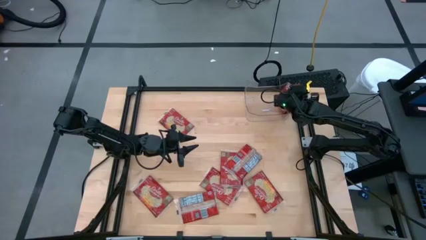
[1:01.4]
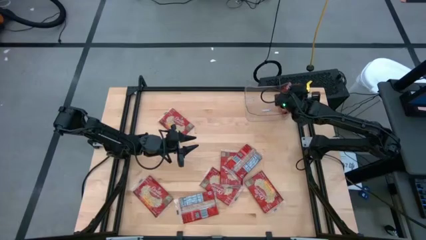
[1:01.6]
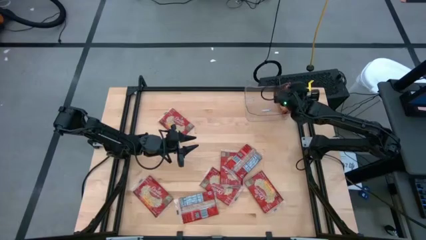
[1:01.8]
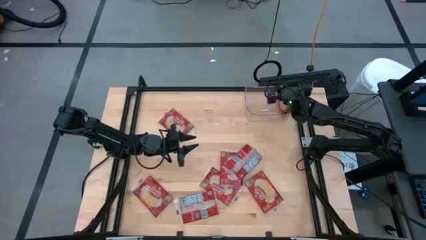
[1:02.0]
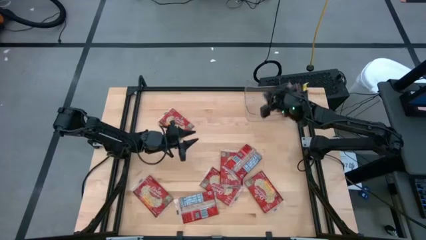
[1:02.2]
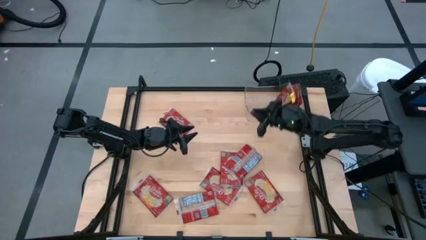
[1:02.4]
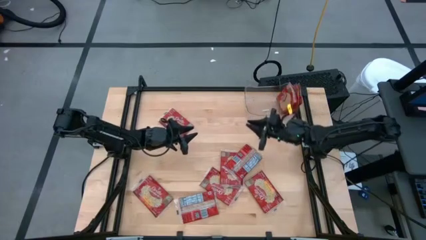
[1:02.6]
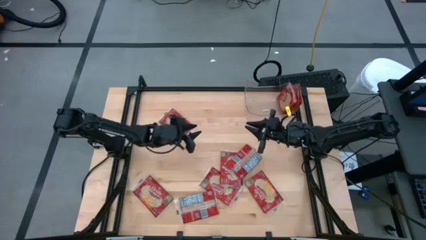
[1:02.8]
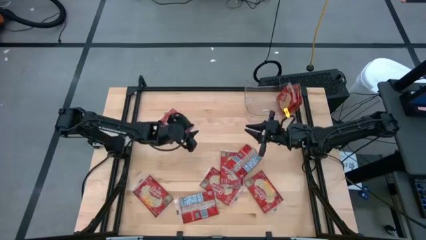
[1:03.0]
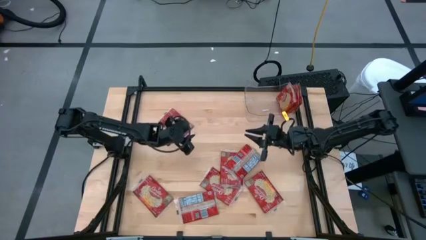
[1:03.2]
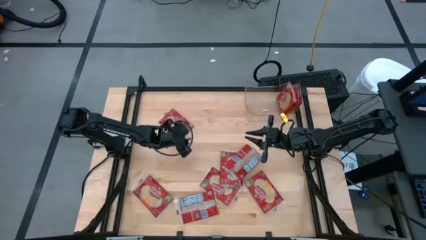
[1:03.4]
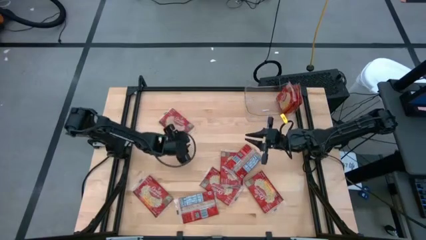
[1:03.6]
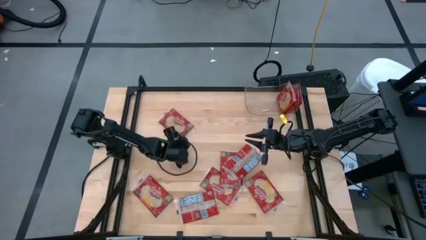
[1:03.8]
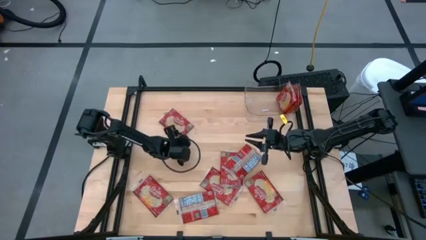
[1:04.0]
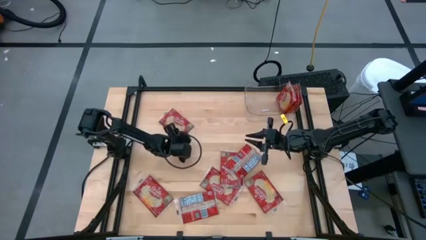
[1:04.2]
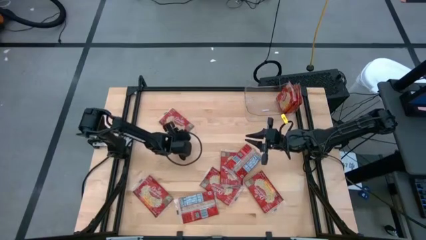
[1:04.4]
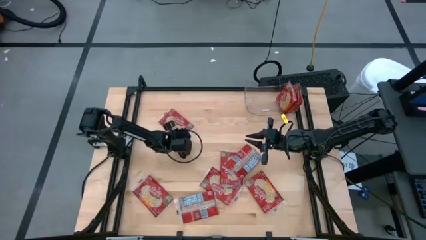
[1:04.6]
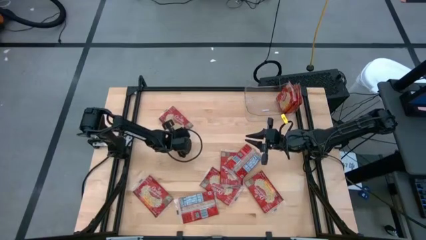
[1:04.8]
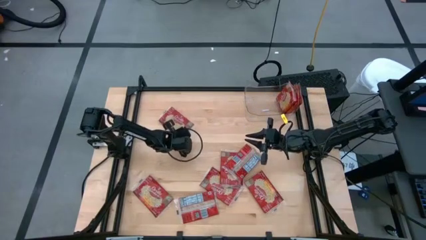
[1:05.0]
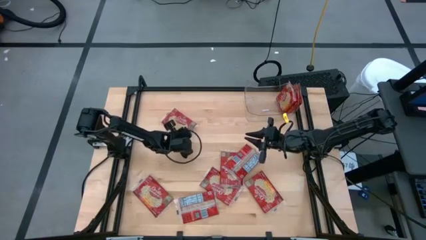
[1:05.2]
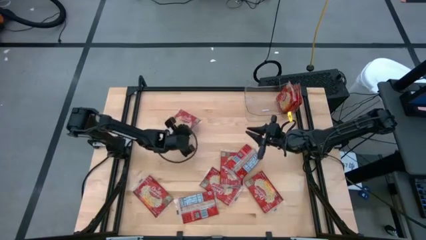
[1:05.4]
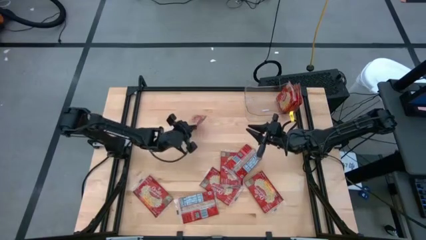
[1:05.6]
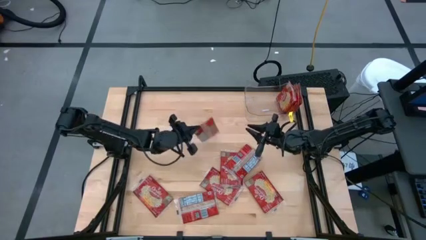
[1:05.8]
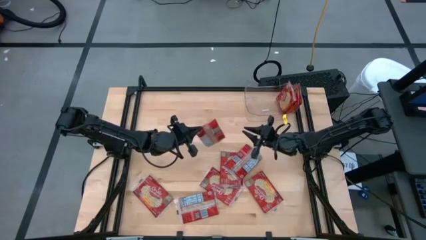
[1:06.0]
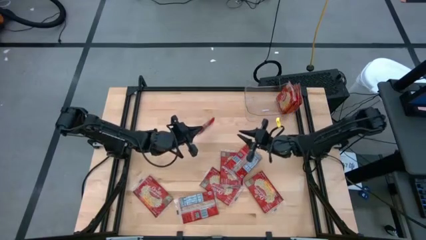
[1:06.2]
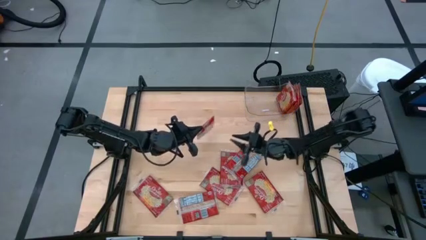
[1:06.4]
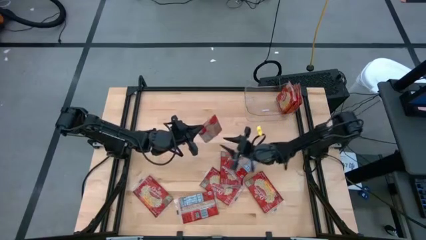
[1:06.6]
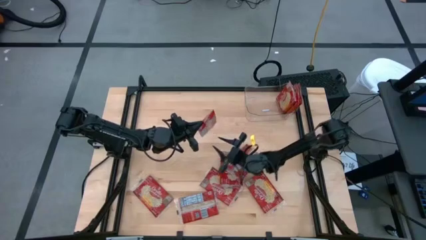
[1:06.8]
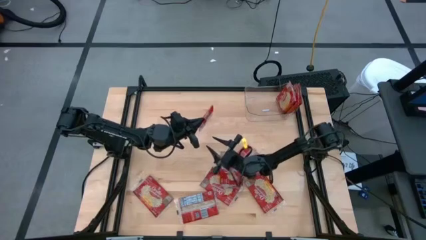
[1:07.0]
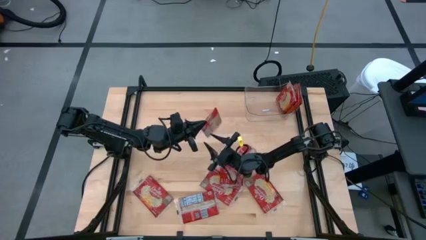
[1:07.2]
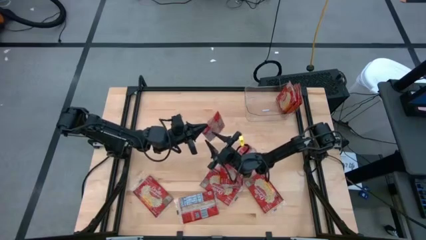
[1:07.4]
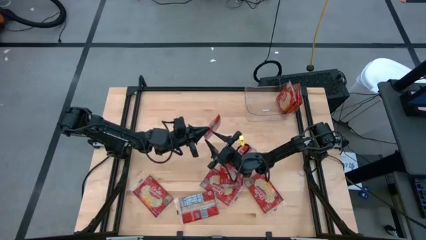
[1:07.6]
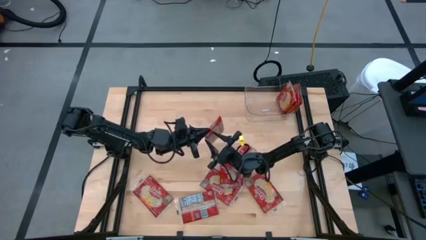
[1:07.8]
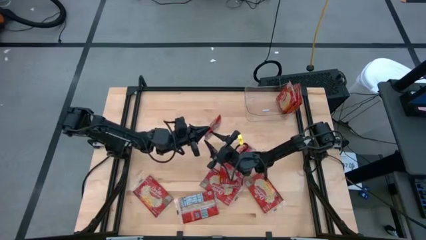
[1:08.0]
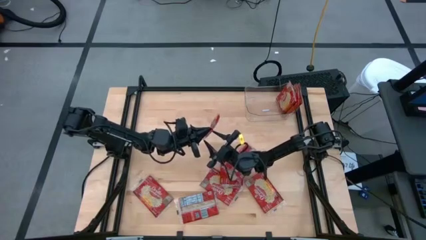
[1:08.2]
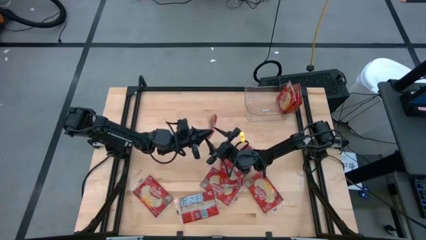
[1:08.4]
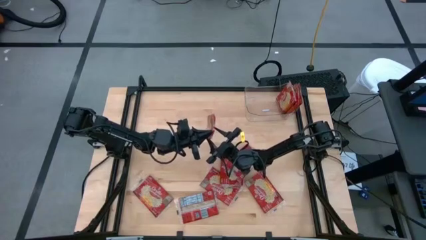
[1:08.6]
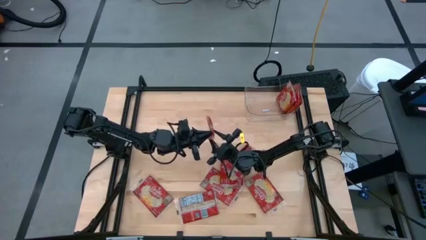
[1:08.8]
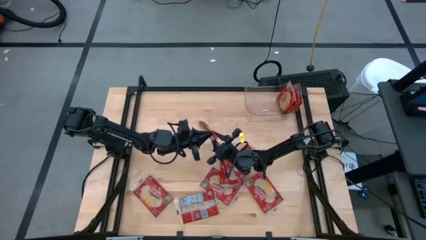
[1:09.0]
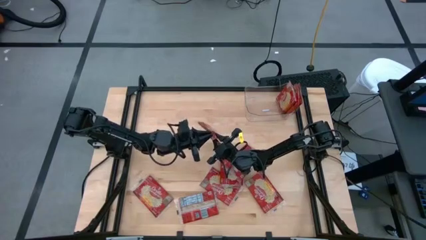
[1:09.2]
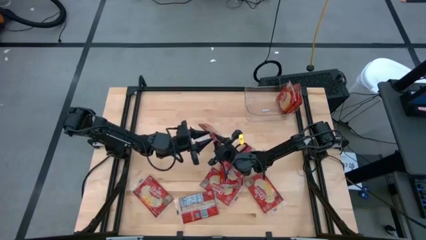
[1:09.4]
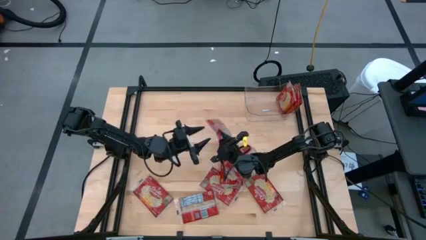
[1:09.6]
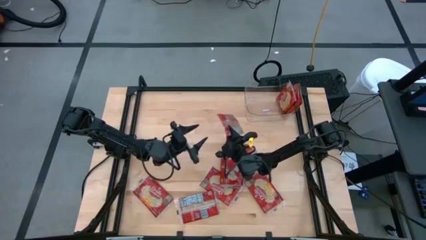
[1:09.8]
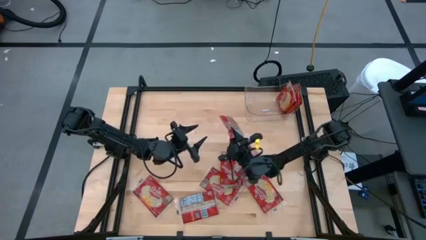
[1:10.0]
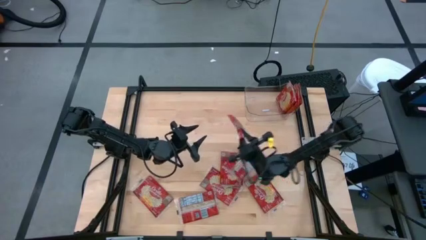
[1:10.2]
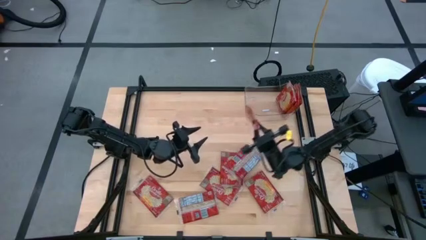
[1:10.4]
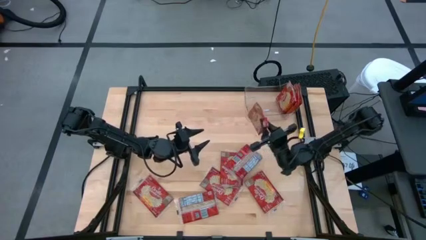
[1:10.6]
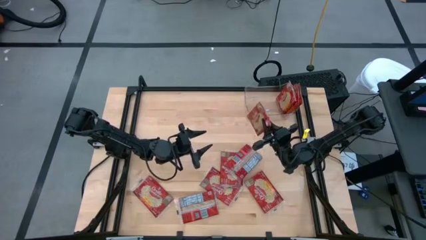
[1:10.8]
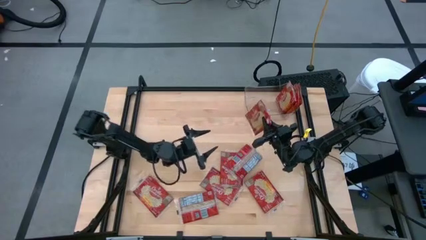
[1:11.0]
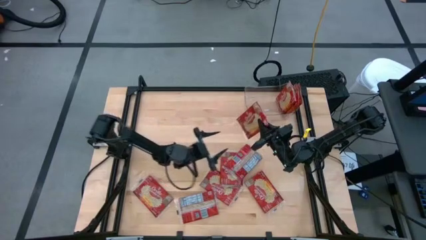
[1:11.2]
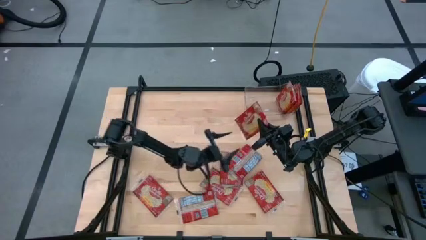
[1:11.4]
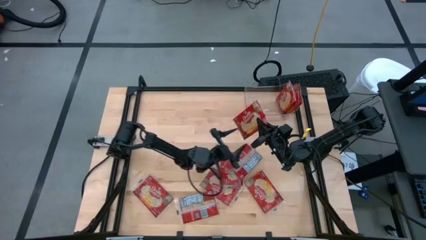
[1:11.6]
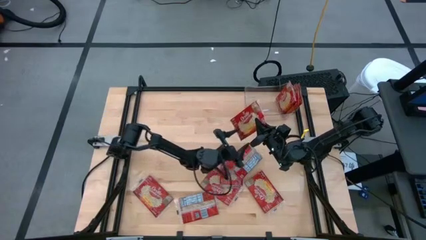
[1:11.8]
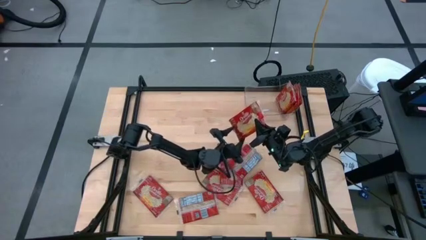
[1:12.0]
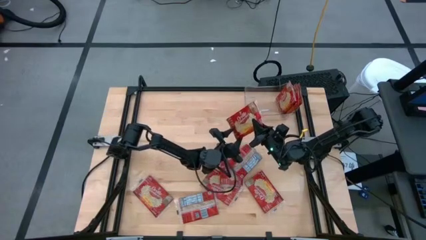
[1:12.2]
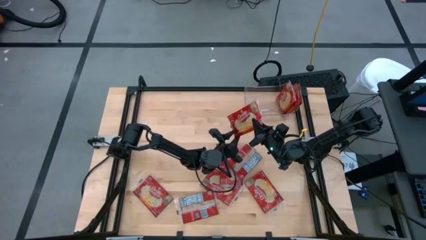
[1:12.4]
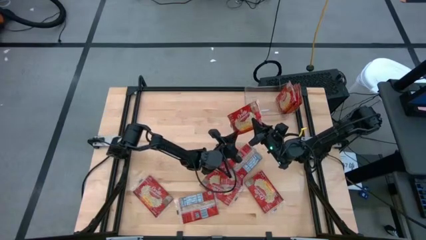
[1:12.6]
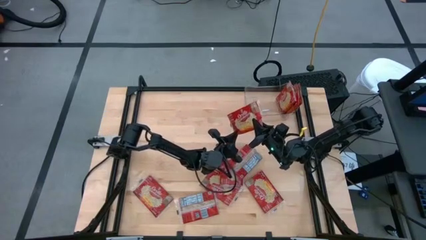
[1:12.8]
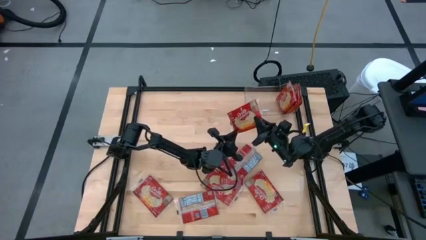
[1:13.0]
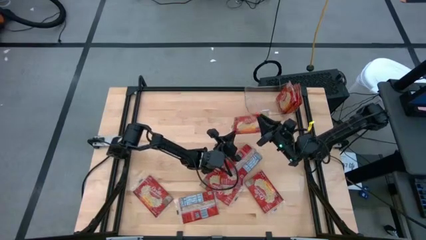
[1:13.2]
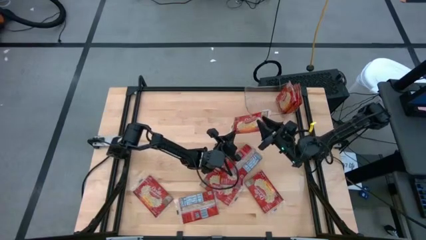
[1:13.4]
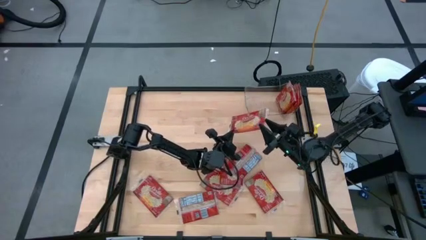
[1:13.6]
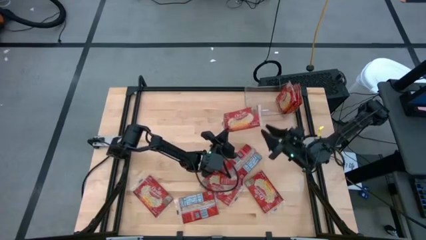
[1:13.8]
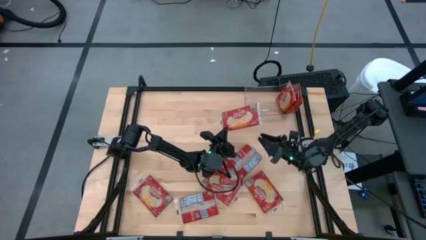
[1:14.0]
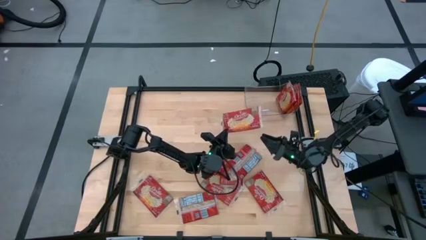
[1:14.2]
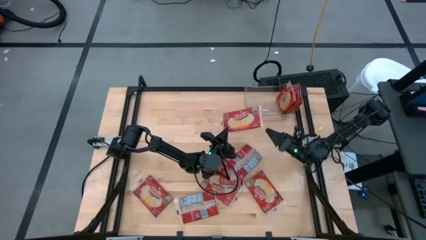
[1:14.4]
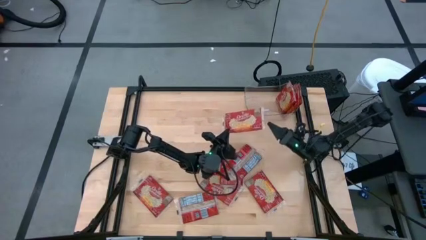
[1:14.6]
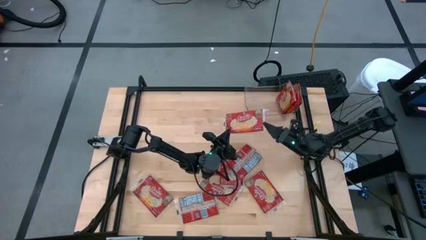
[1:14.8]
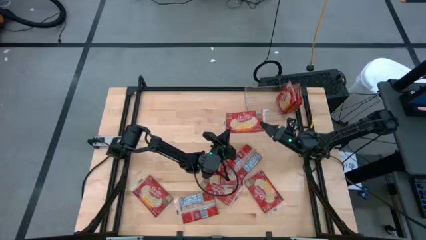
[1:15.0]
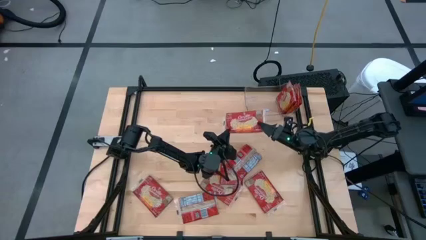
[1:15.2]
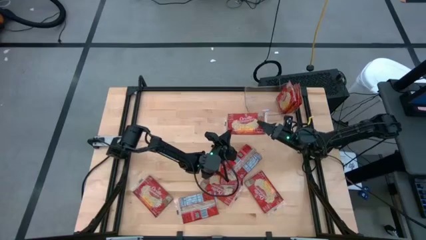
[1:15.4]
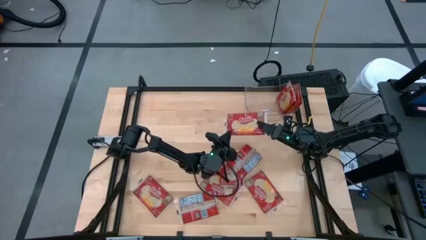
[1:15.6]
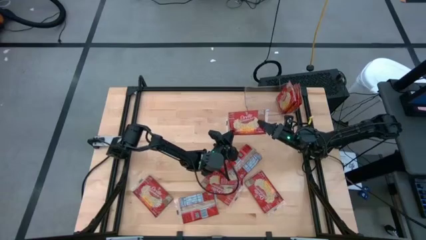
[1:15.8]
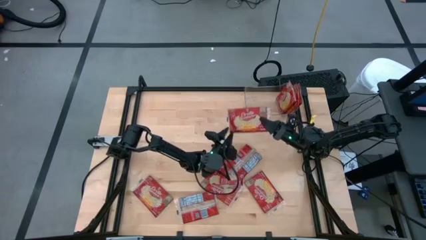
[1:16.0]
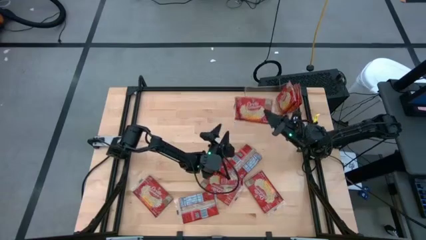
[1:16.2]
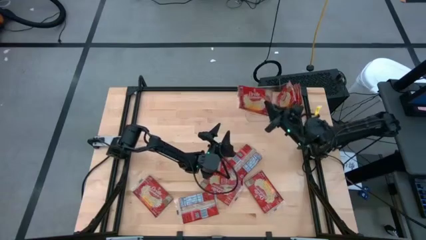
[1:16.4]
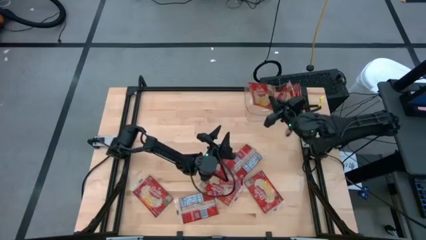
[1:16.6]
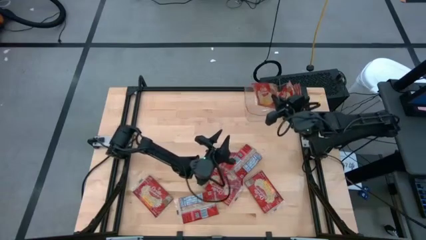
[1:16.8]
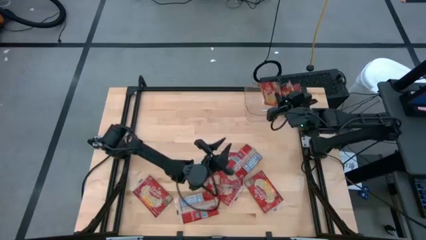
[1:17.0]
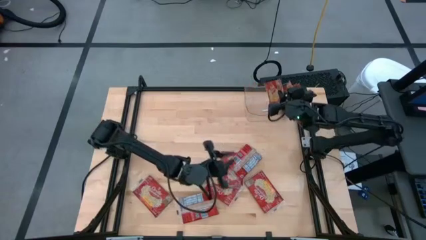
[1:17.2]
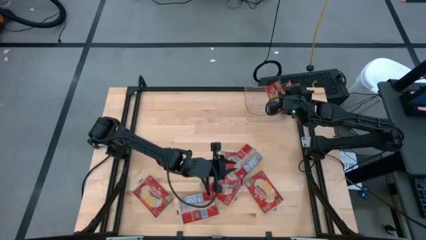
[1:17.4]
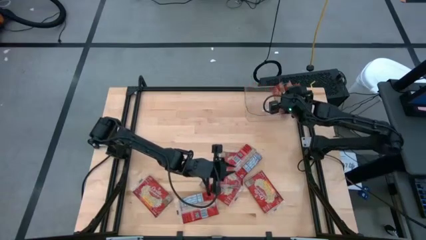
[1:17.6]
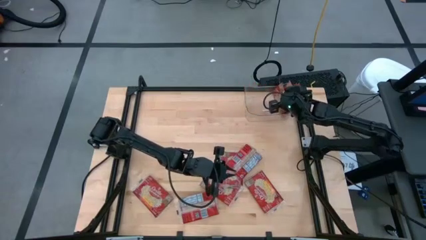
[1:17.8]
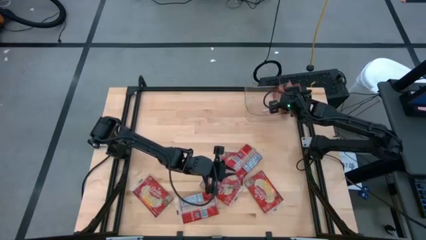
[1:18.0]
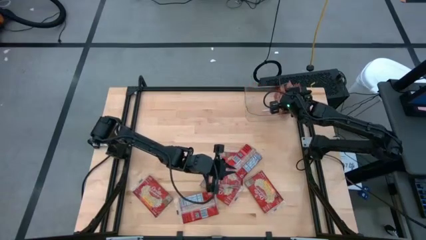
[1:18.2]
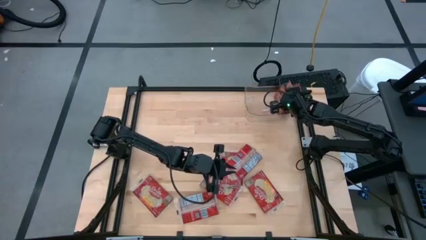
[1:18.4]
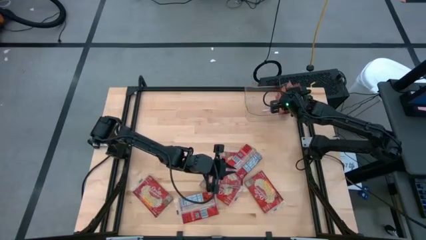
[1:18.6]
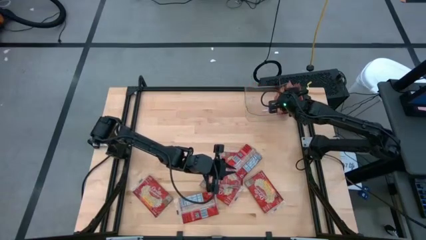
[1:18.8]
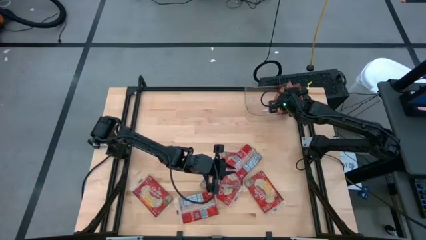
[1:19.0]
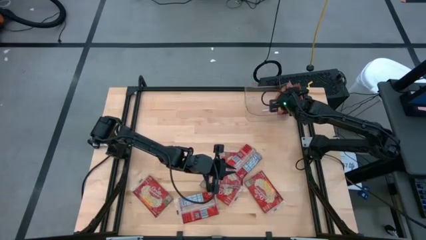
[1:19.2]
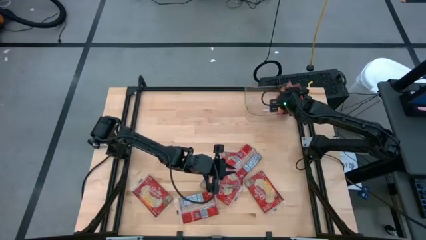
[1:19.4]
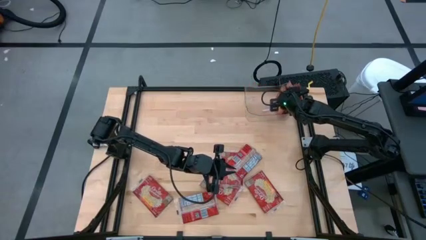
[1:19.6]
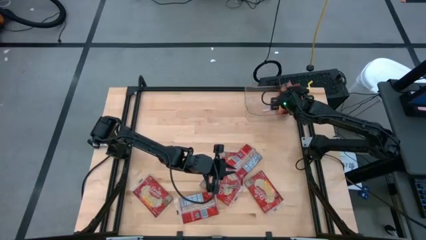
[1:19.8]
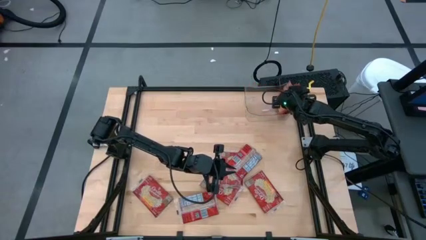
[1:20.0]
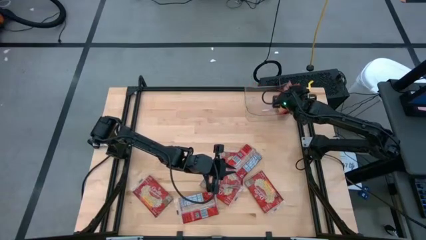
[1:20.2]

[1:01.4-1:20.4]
Task: Sort popcorn bags into baskets
Put the red popcorn bag into the transparent bin
